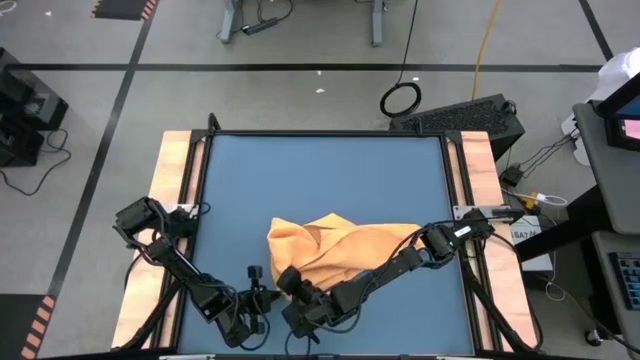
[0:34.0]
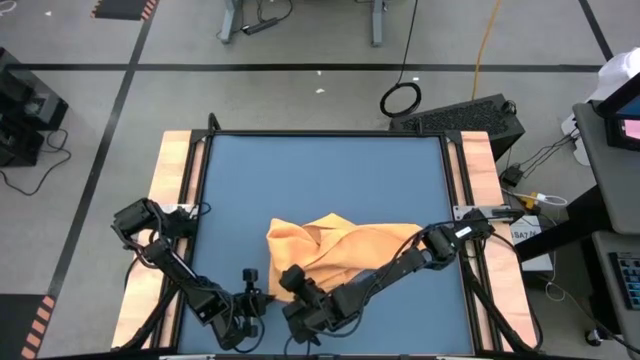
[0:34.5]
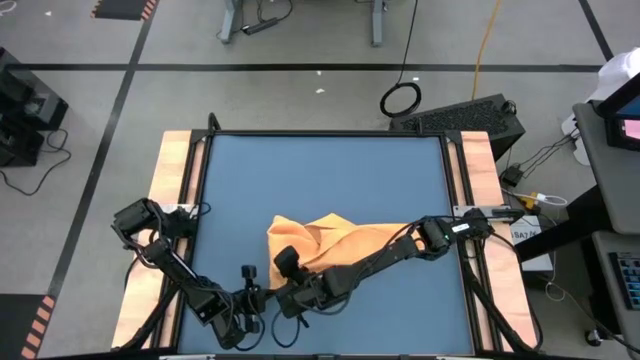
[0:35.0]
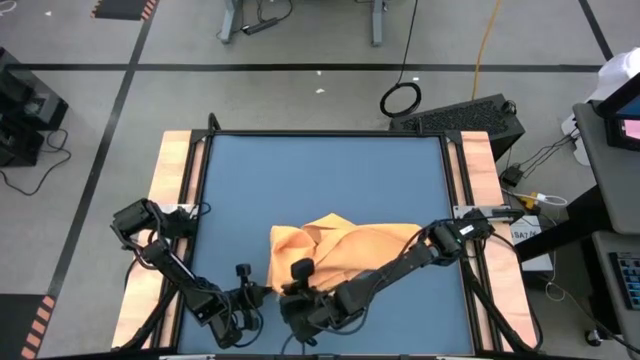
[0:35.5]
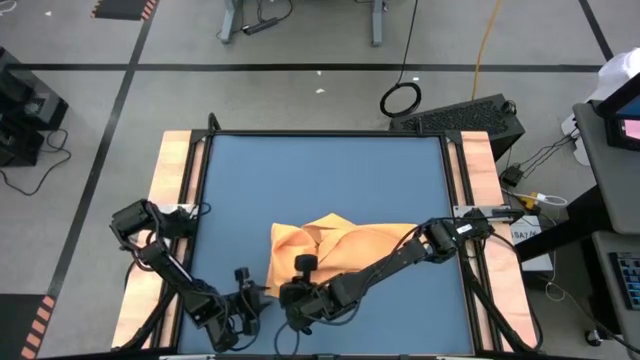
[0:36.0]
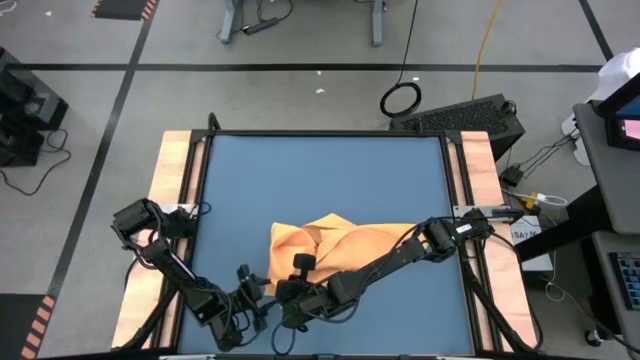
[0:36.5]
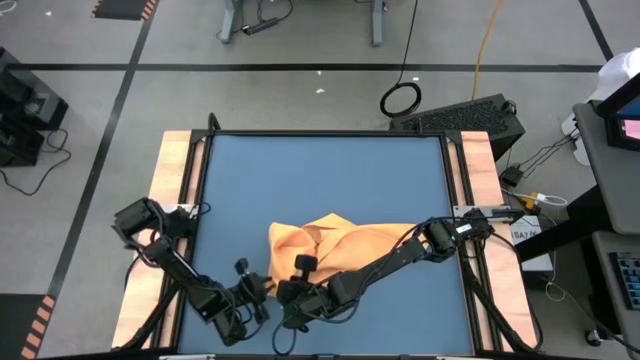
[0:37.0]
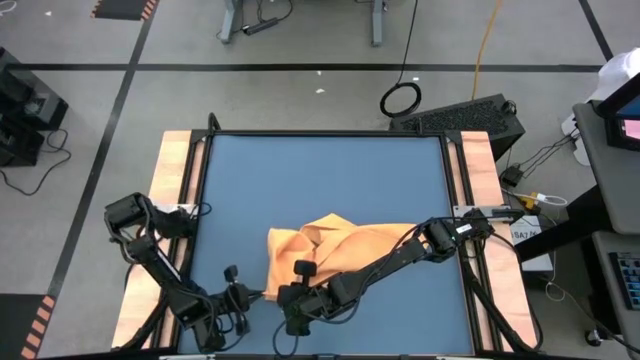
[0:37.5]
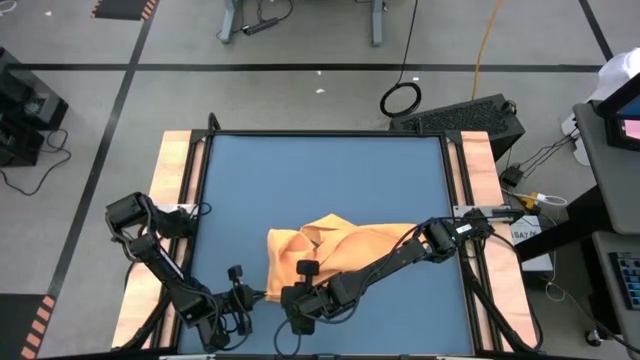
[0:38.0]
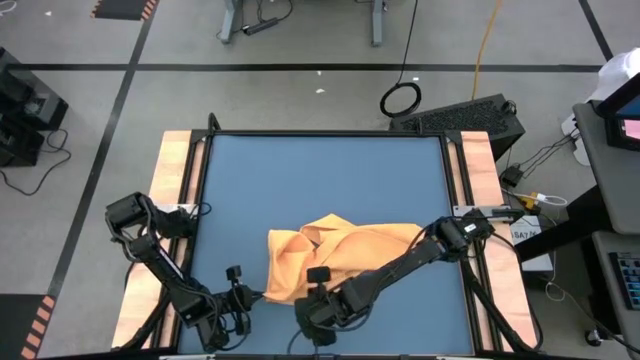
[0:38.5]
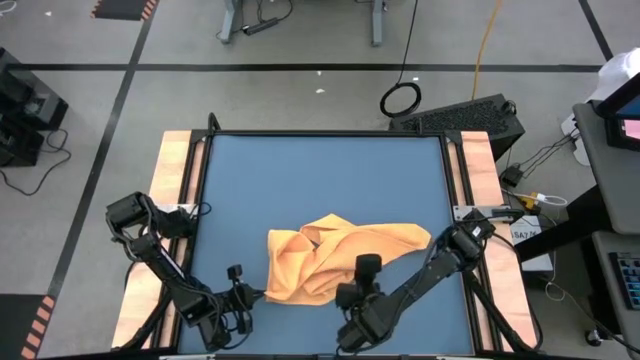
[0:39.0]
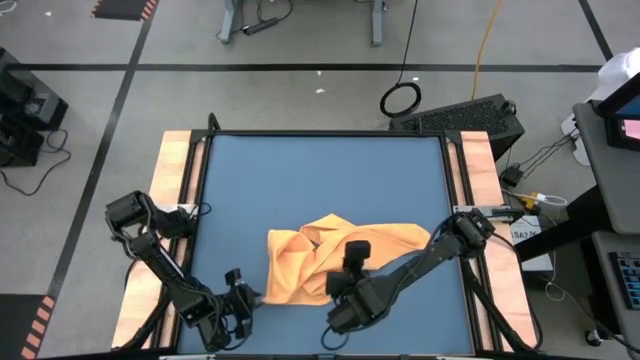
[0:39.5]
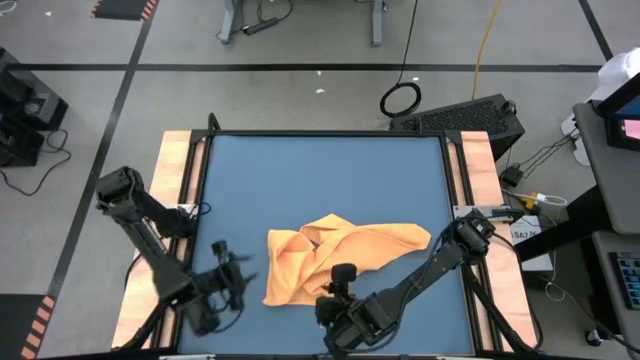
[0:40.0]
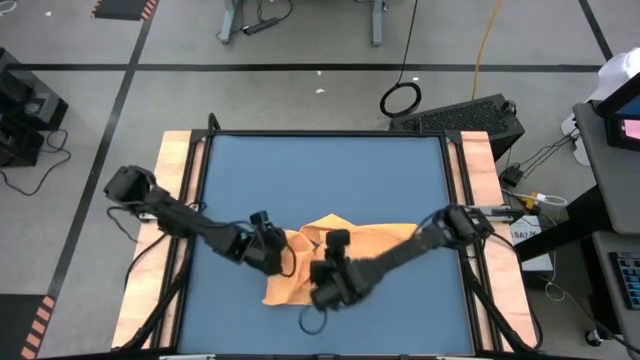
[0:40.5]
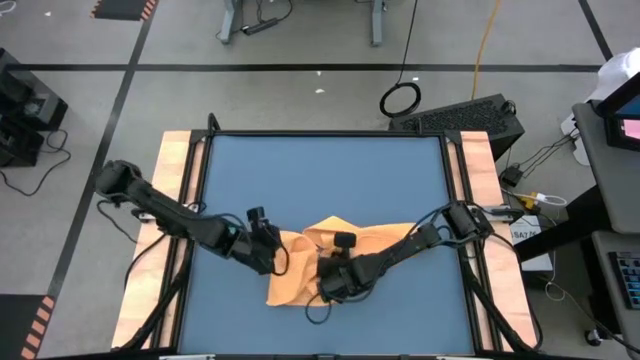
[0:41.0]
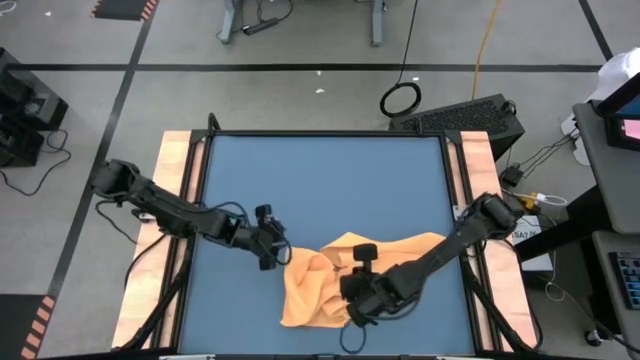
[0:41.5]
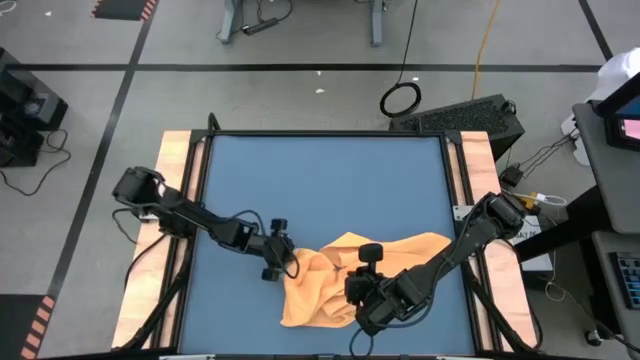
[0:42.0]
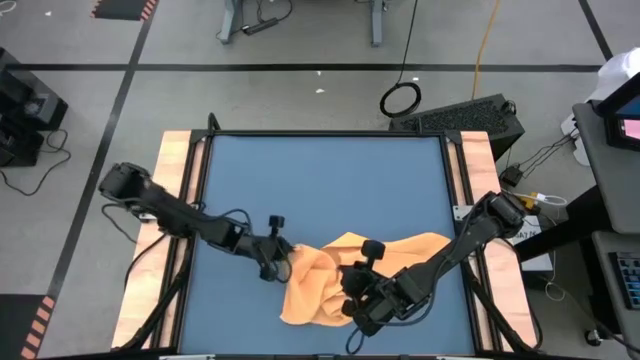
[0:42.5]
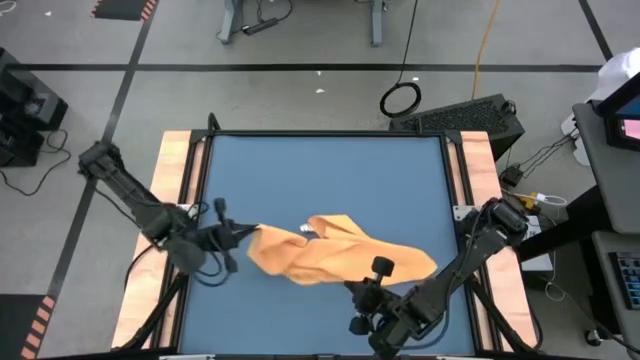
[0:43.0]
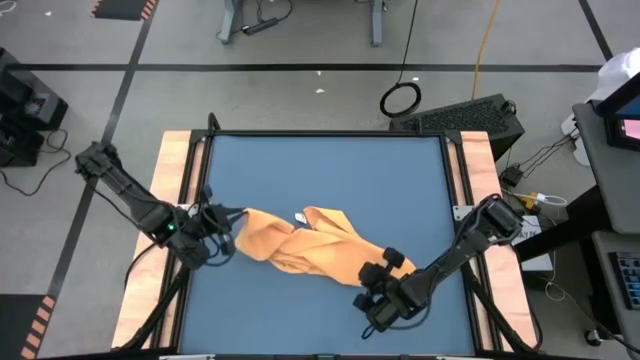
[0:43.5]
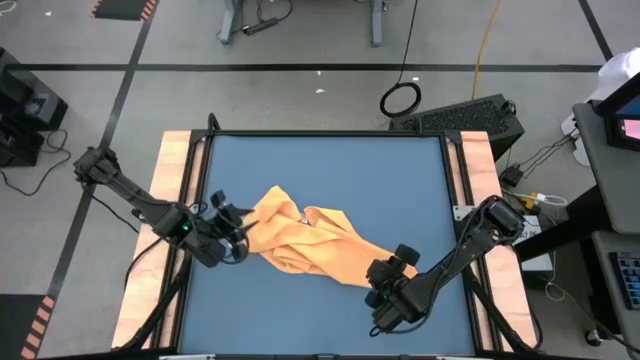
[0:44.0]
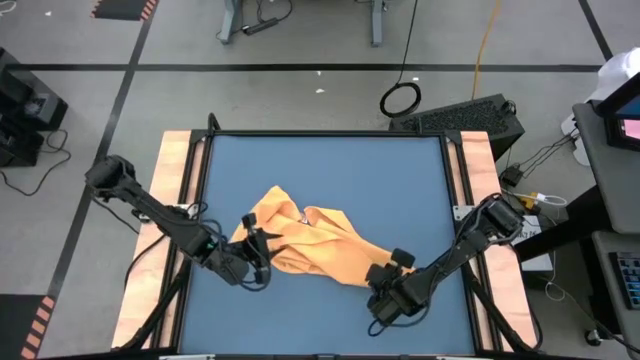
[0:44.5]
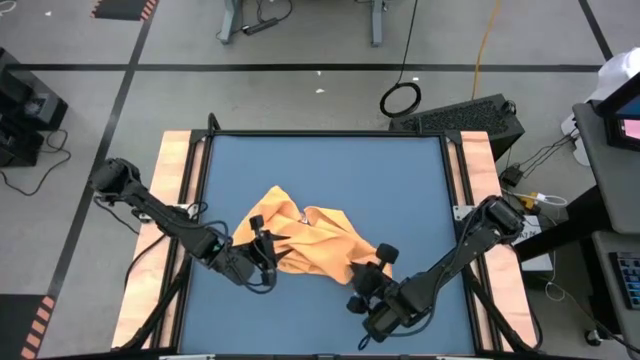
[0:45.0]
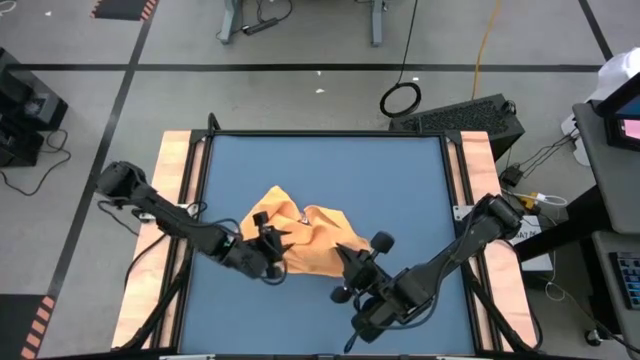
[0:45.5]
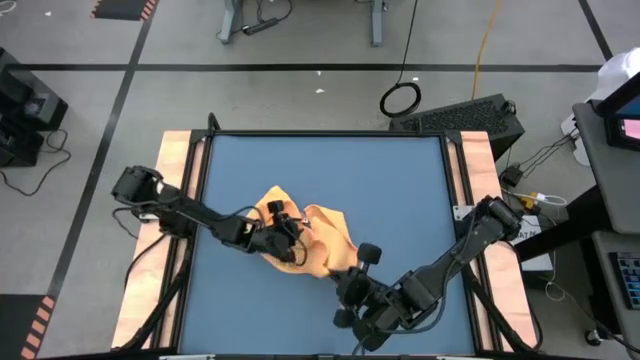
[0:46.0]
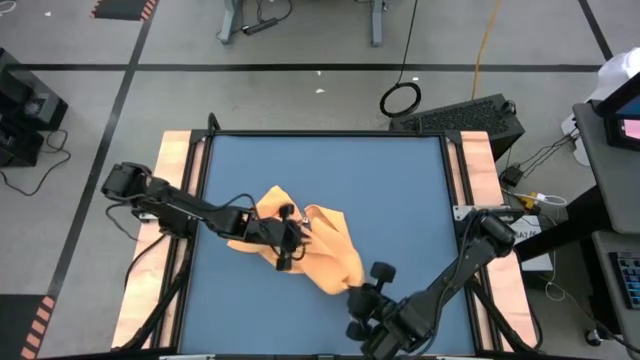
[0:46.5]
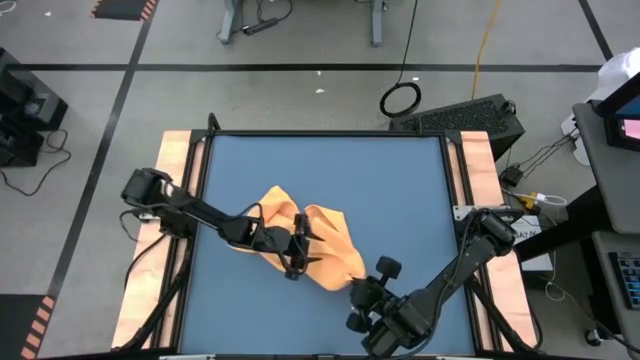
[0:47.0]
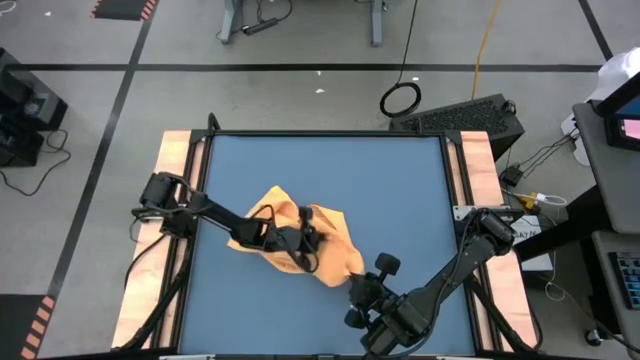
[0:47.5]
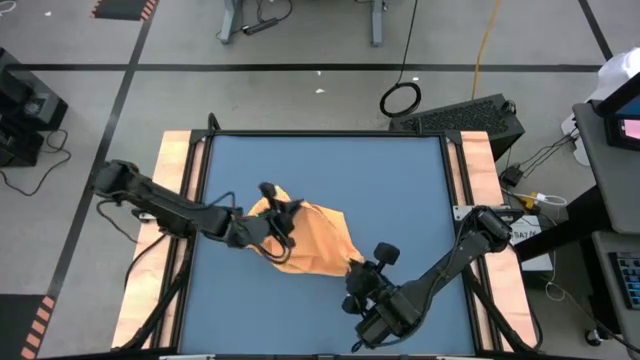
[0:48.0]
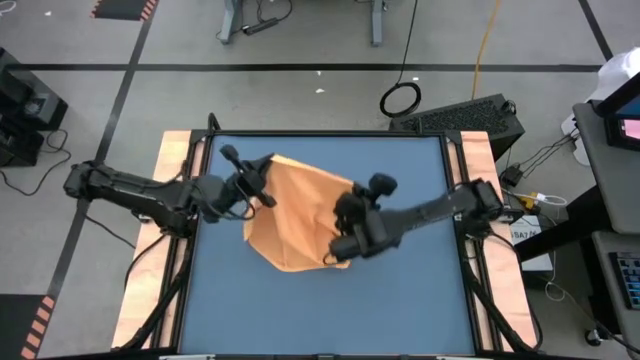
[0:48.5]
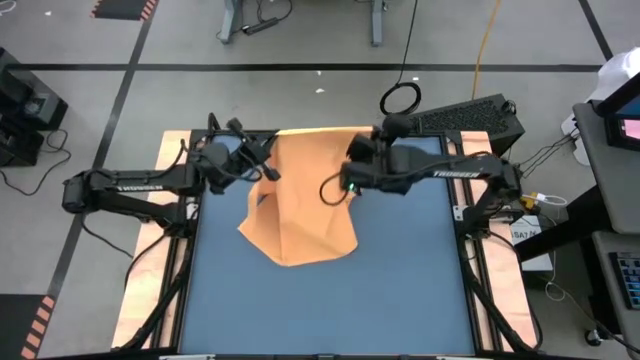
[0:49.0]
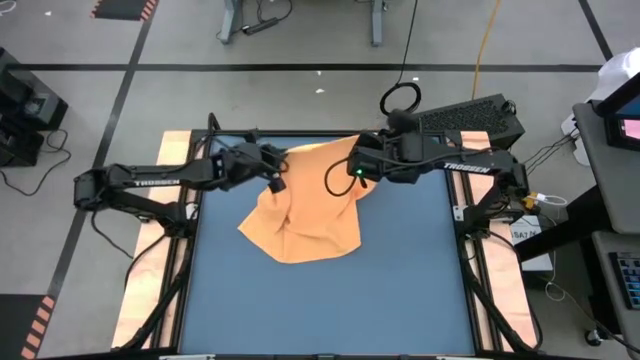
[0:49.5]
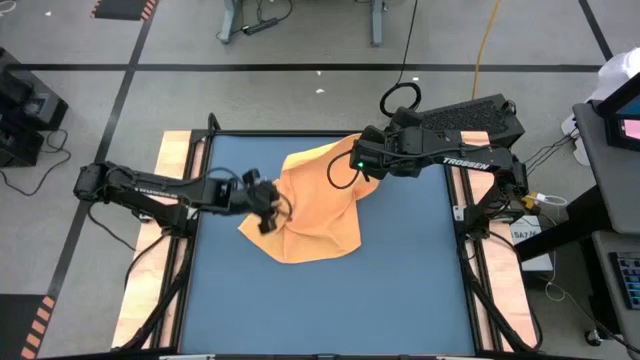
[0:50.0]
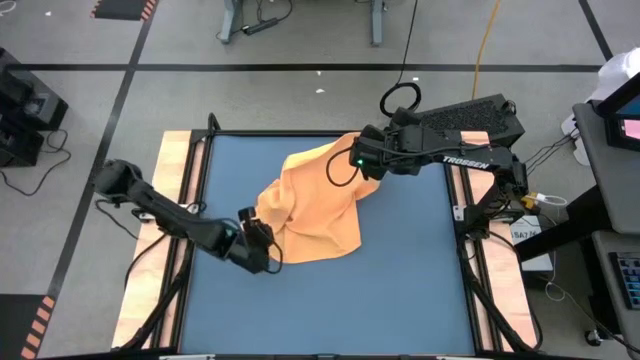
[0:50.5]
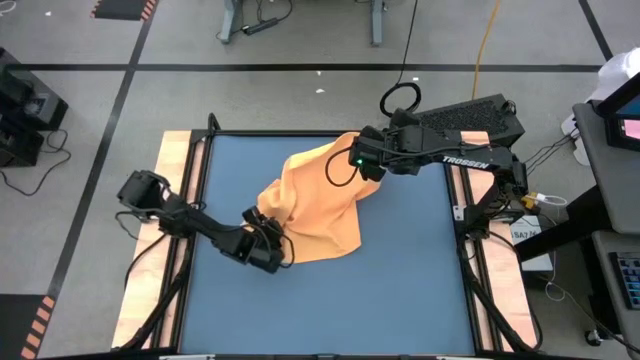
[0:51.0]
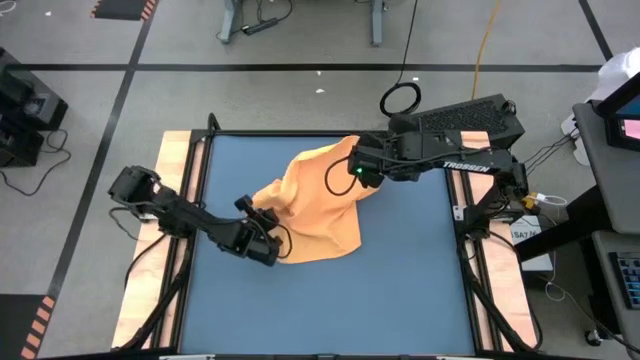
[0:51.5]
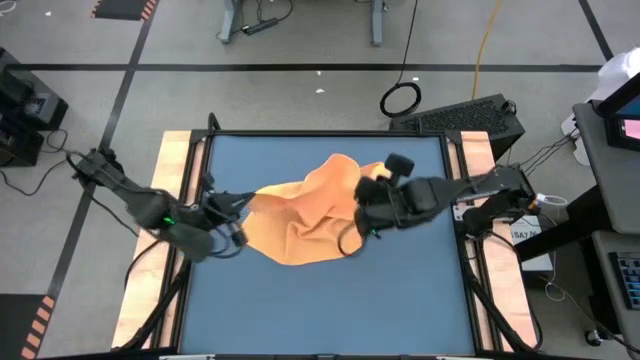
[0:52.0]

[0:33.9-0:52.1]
Task: Roll towel into tight, uniform cylinder
Fold the orange microfiber cloth

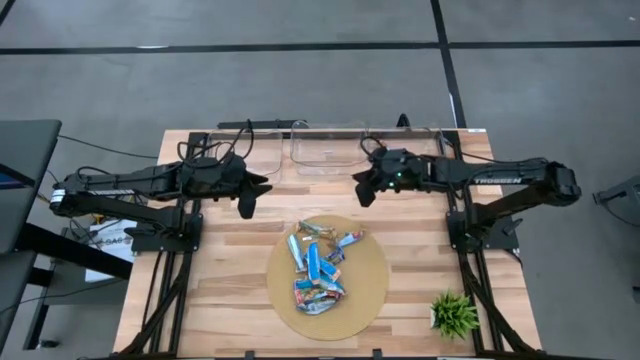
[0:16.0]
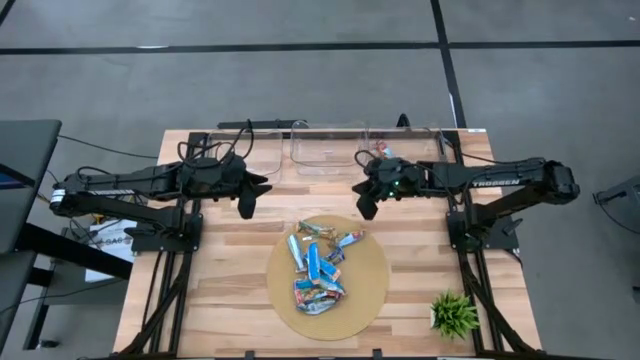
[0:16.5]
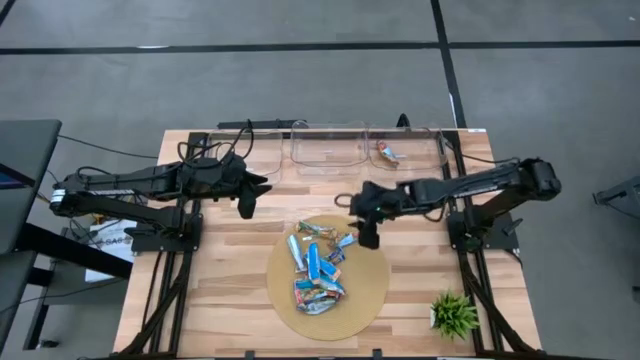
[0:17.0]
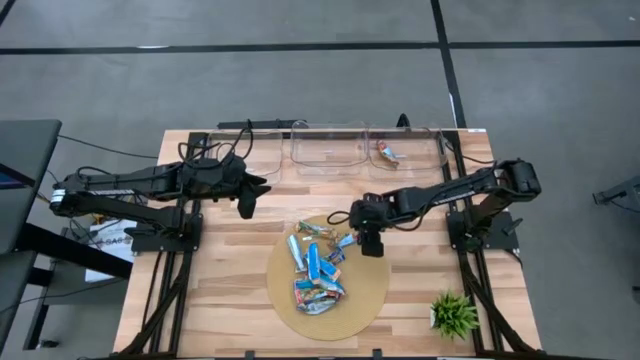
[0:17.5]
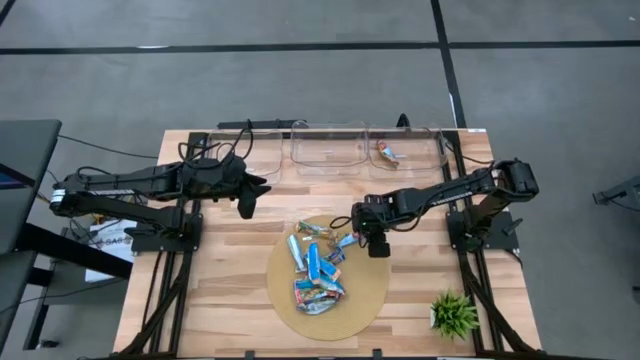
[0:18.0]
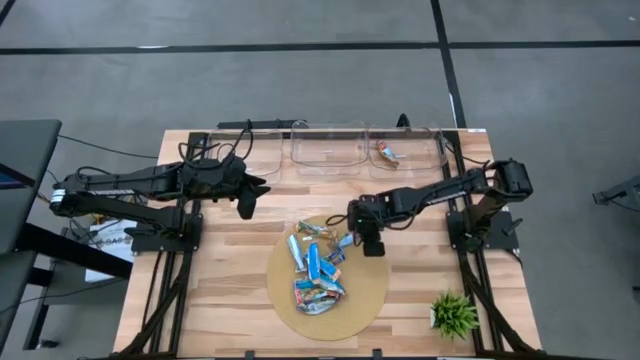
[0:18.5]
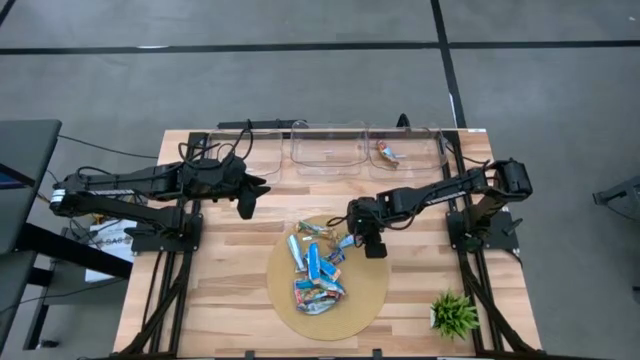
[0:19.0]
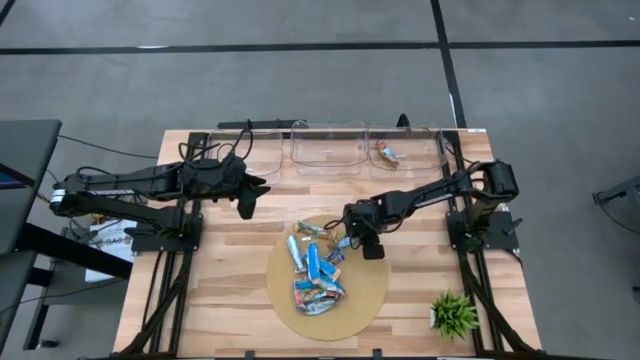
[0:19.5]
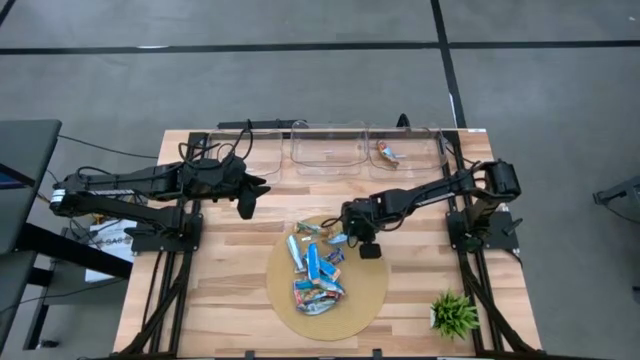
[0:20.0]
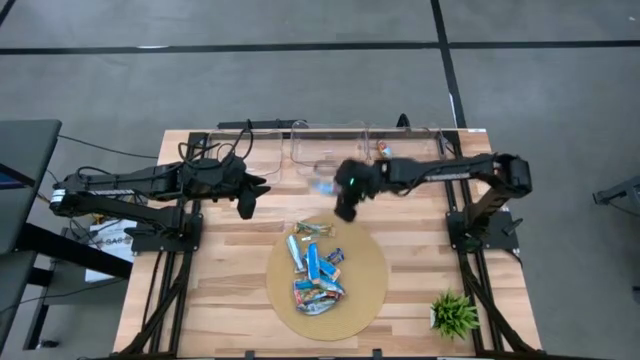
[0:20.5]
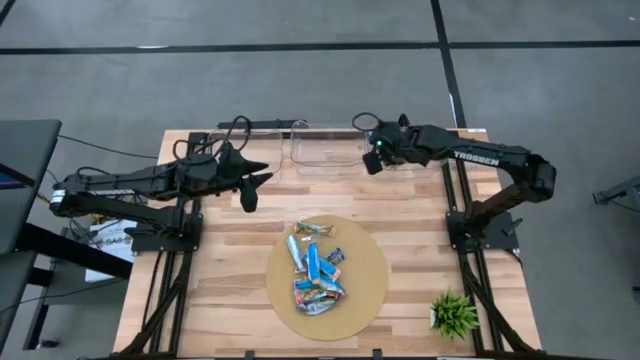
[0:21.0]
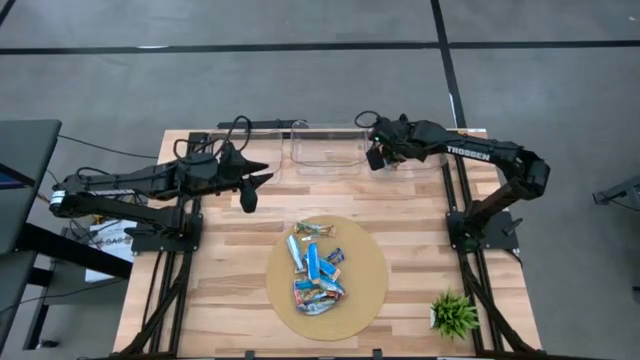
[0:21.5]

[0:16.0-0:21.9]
Task: Pick and place Granola Bars by type
Put the red granola bar into the right transparent bin
